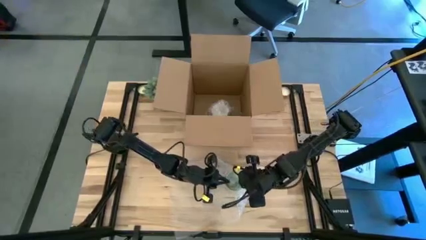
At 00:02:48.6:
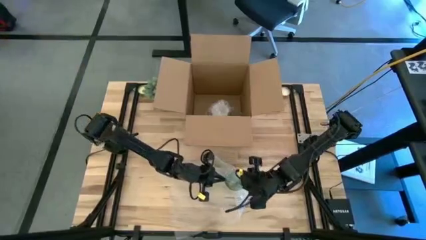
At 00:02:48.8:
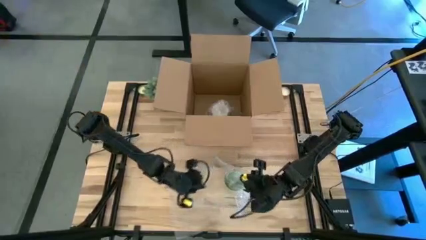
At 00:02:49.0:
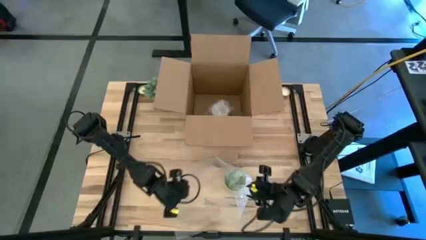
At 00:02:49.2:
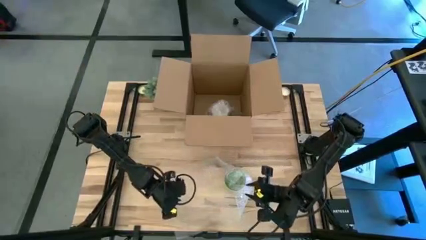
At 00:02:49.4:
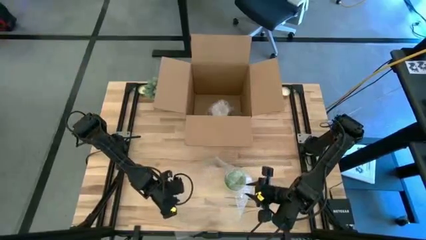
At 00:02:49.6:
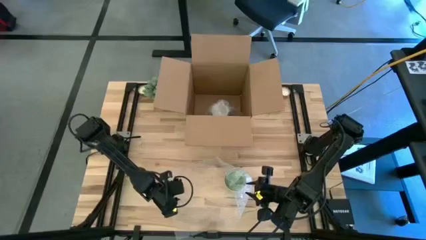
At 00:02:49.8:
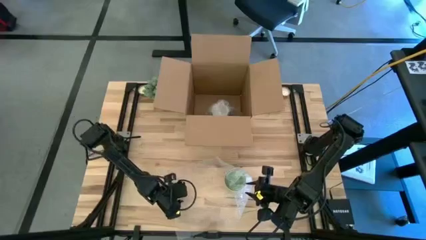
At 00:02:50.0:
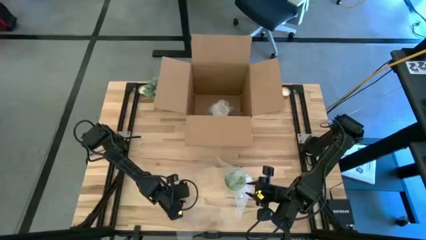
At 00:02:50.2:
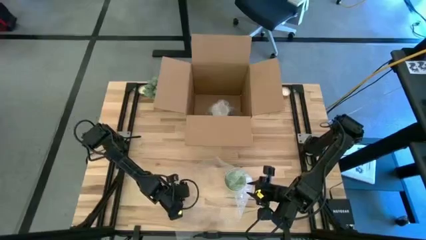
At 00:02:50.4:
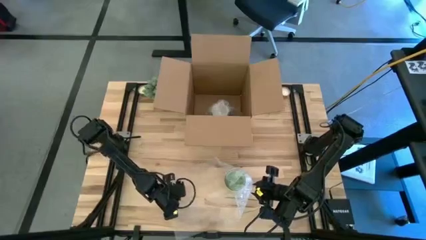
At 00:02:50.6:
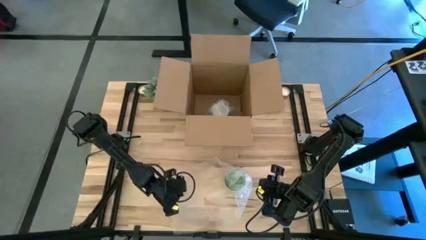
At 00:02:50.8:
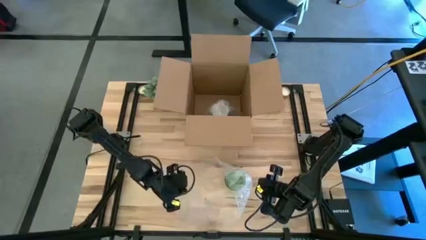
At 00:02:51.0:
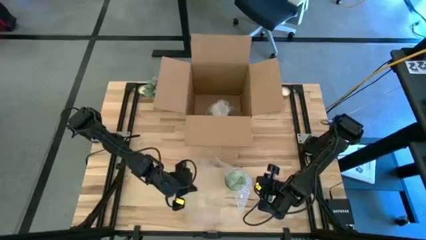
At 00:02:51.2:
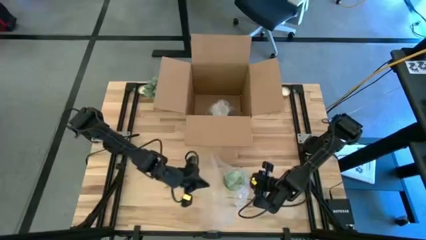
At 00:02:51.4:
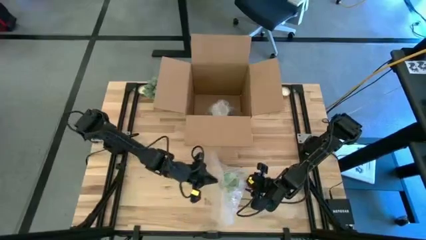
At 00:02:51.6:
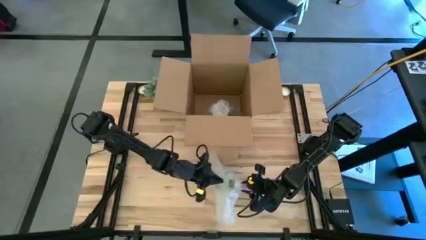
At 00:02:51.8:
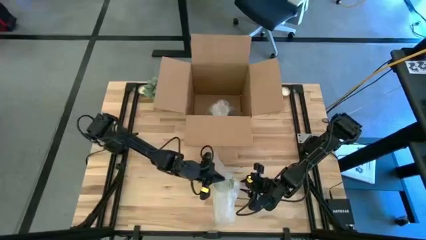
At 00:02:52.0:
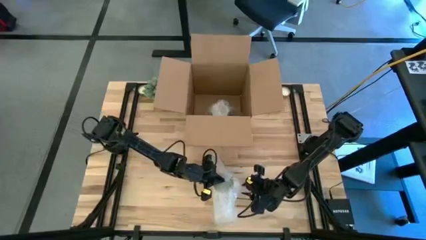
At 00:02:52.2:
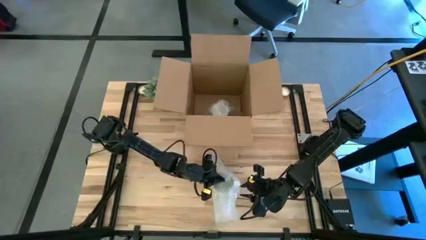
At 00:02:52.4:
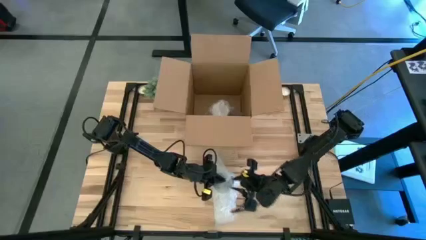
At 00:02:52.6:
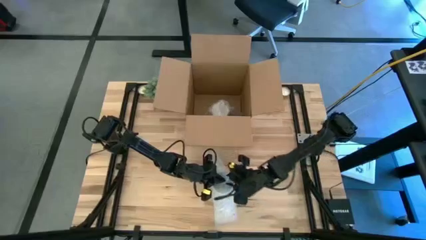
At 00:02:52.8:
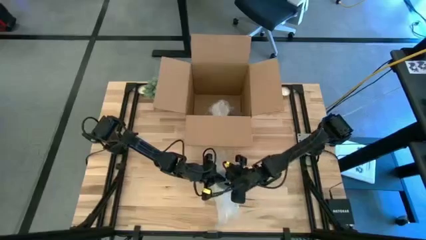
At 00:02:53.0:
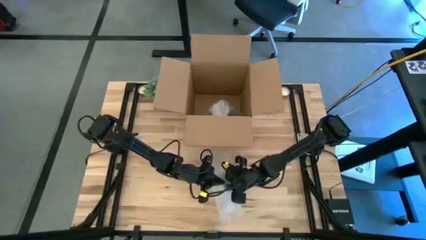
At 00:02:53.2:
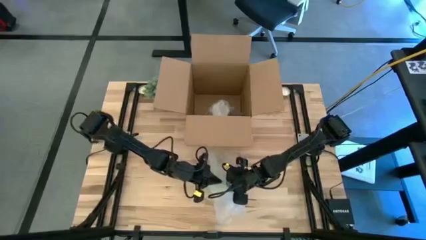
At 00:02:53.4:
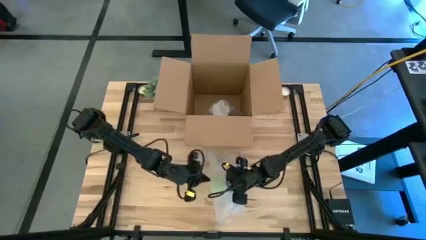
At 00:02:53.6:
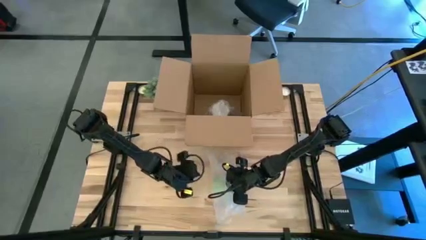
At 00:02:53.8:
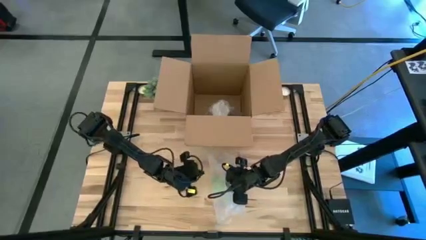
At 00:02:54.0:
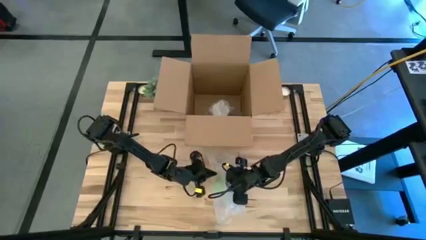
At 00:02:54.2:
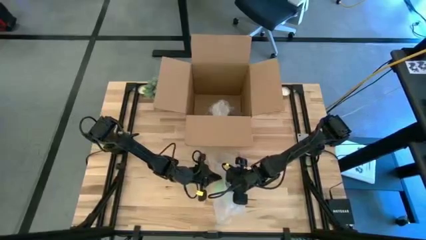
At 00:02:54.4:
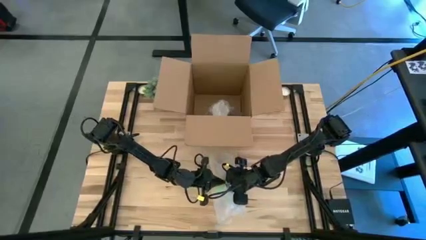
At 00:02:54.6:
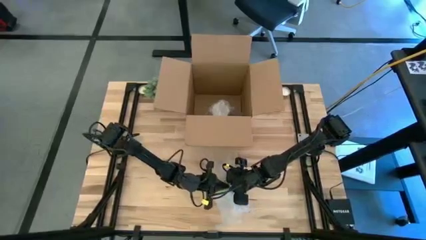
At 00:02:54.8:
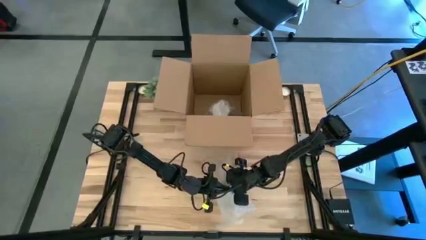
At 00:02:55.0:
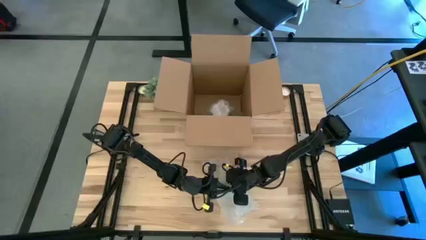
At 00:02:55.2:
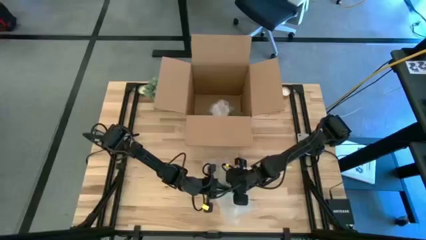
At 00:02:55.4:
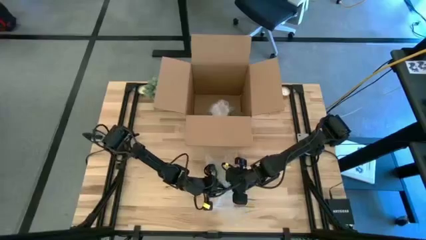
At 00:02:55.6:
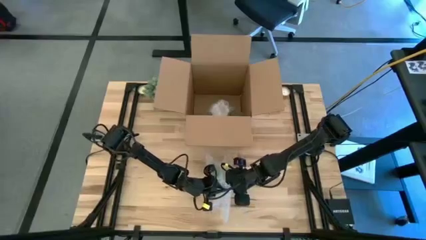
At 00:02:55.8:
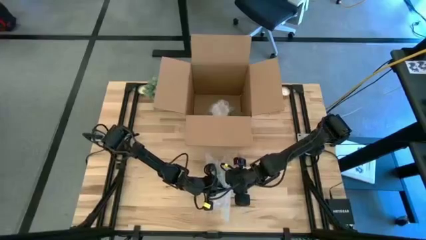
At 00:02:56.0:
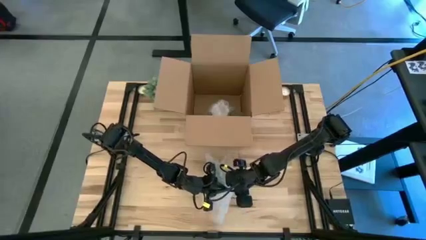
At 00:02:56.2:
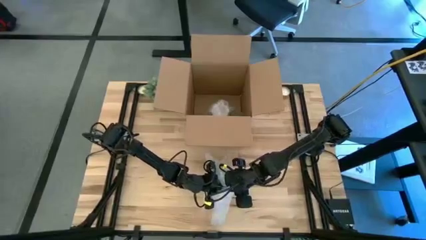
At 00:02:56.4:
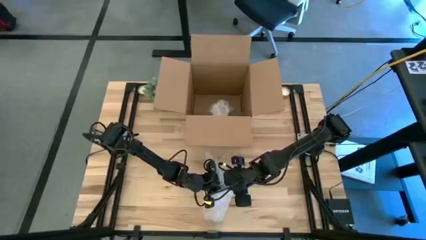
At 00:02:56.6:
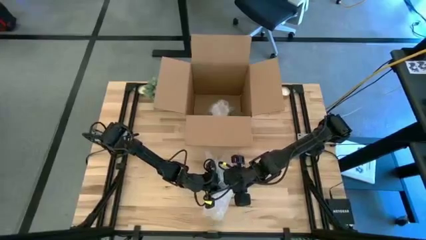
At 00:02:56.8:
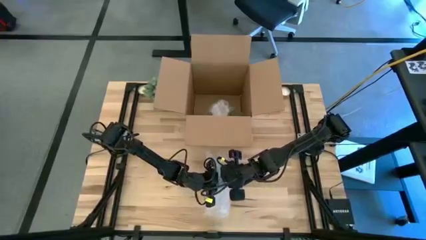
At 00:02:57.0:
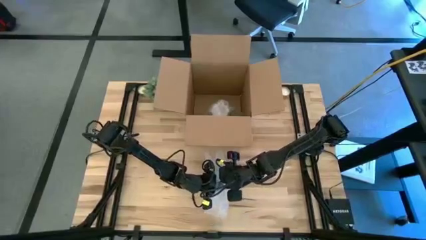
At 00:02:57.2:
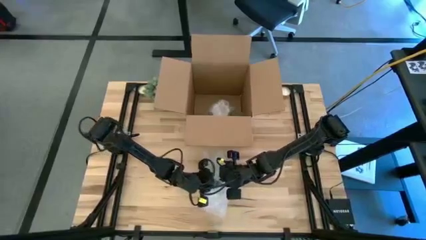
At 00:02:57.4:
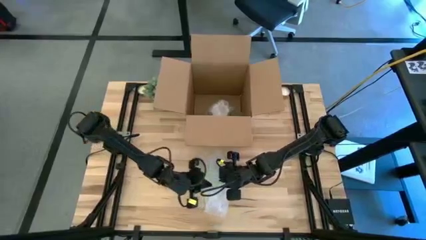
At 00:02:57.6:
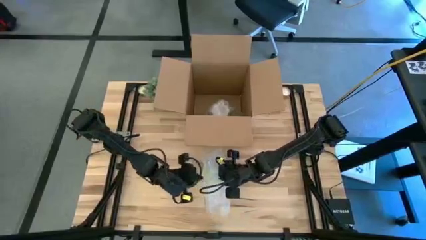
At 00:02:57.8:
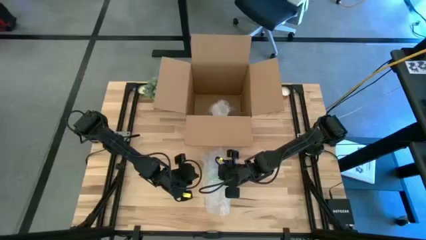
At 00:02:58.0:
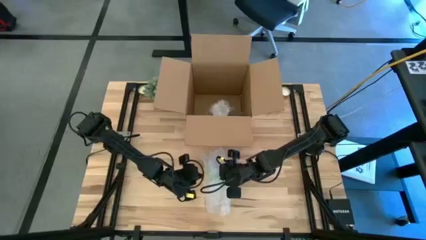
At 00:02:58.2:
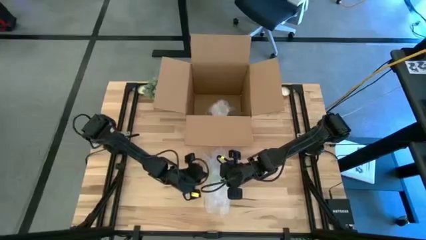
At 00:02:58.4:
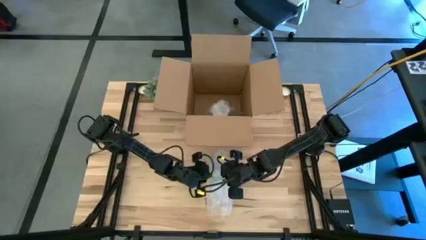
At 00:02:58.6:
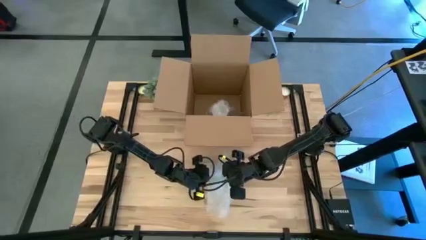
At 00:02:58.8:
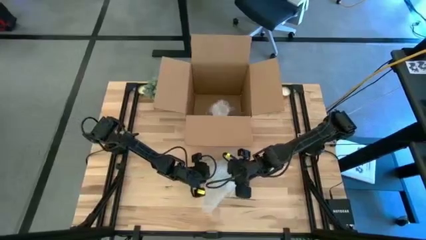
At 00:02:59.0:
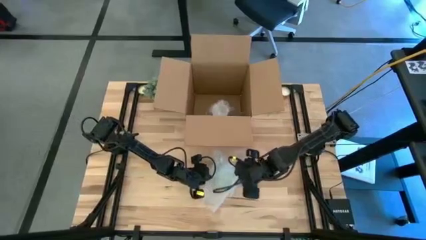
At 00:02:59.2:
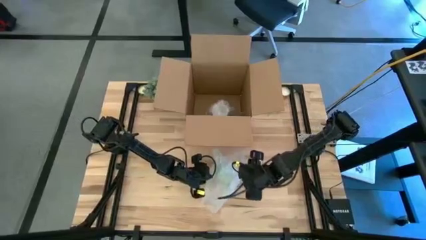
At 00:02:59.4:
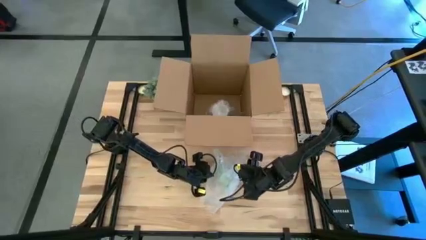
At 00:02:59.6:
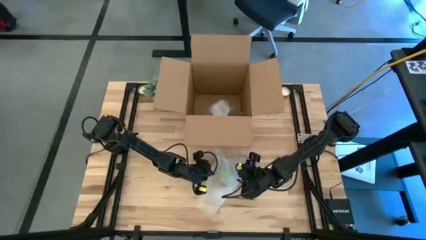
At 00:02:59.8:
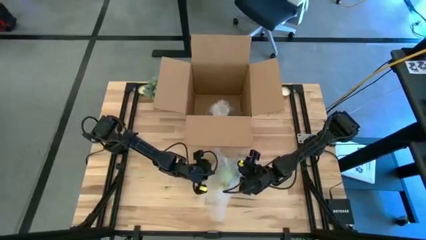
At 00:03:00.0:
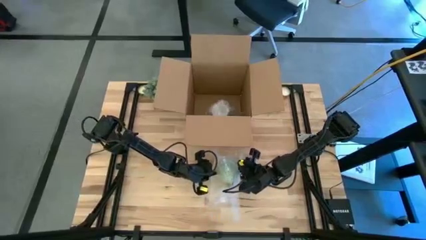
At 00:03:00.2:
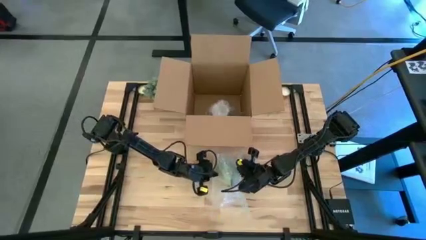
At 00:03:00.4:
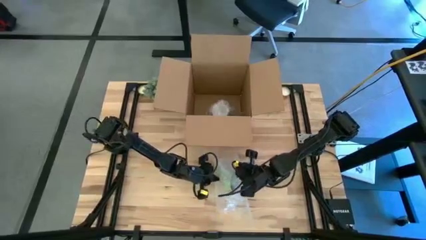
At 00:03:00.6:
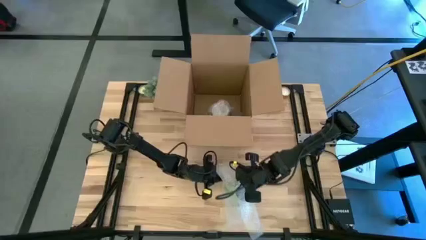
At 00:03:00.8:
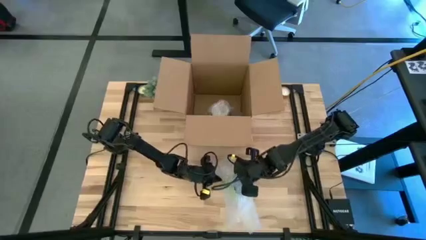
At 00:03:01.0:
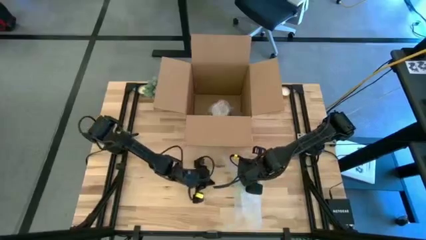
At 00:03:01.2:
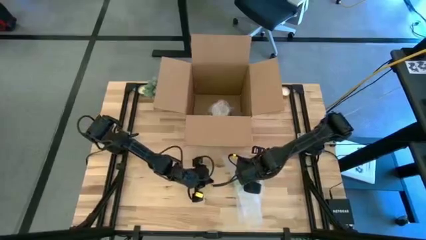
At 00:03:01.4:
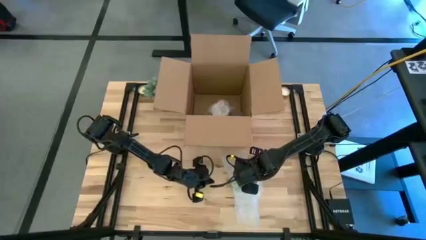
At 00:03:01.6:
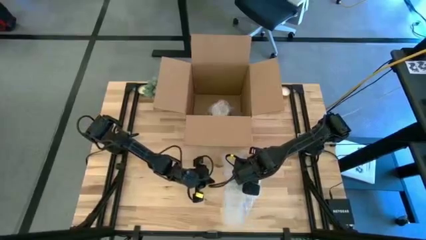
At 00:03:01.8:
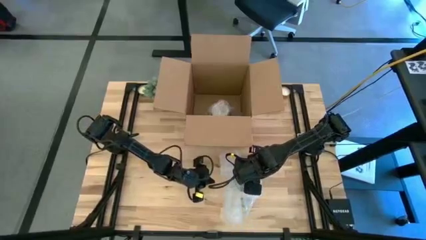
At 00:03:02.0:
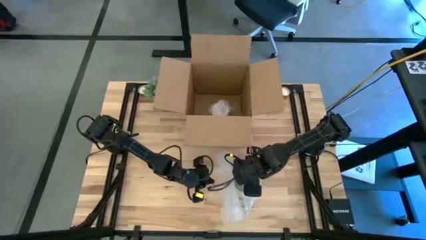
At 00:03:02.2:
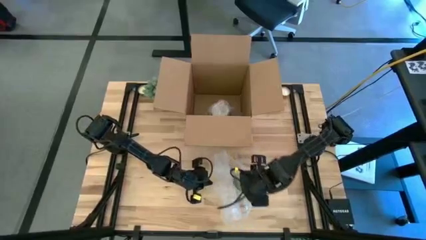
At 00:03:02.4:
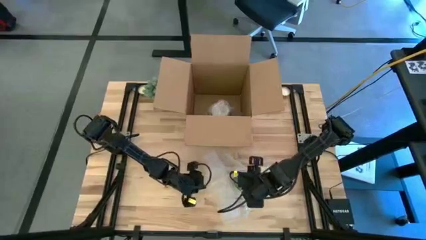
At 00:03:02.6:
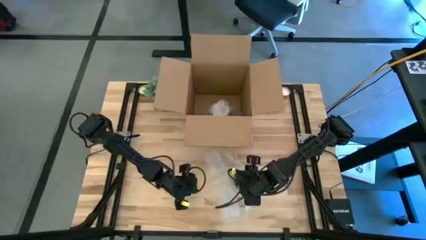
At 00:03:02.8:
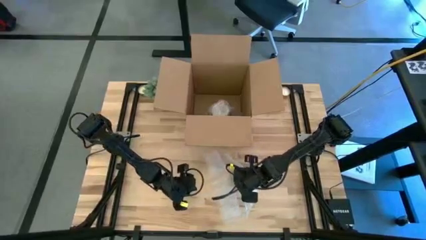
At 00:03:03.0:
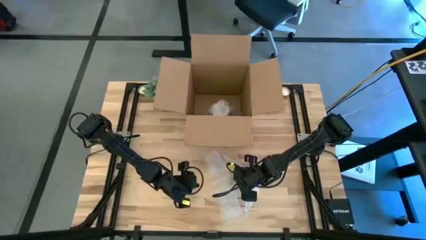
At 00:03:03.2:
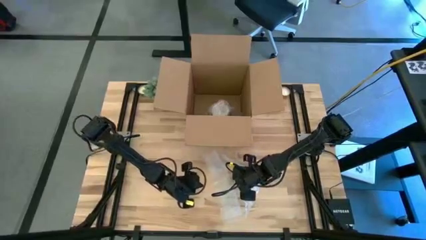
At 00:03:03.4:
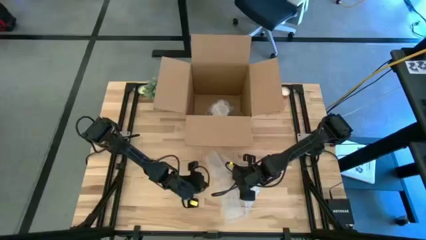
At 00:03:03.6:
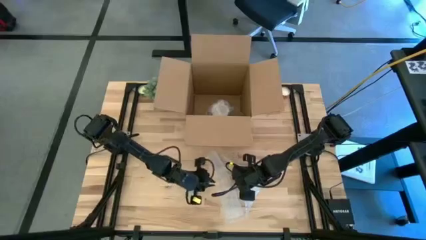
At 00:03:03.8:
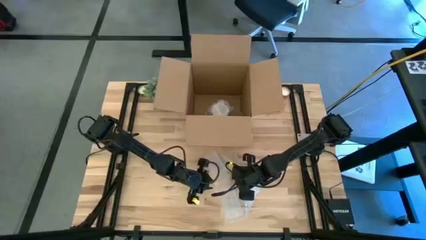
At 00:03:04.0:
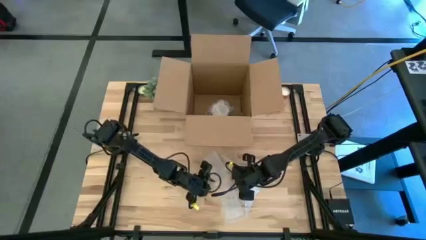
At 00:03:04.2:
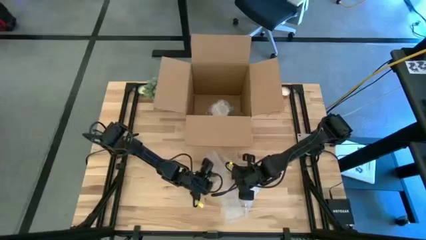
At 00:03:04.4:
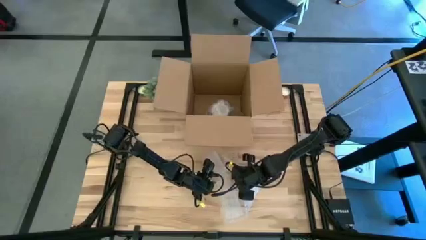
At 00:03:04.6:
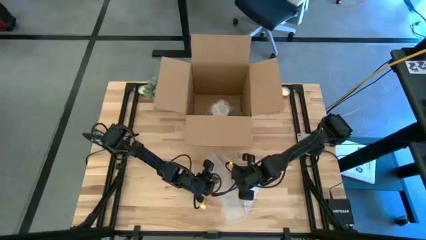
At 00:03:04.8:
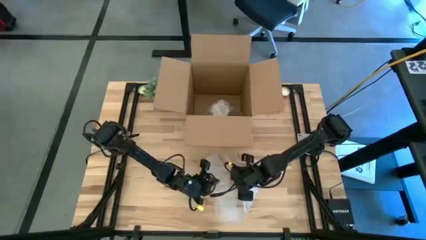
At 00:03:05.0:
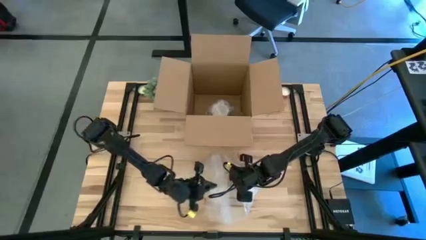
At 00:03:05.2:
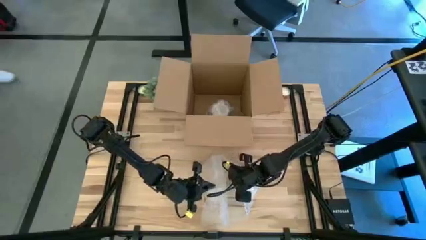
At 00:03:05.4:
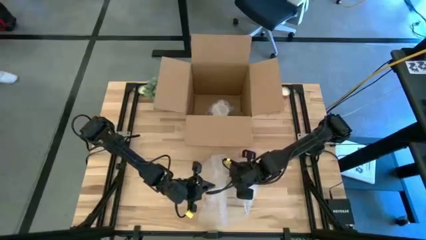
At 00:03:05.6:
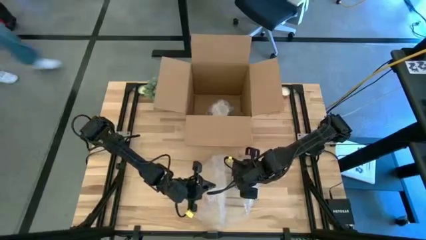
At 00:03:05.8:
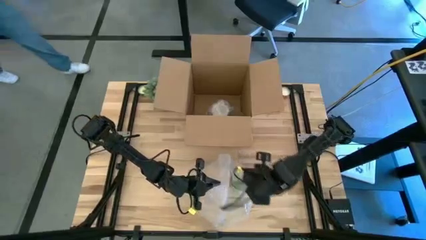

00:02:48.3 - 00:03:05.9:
Task: wrap mug
Wrap the green mug with bubble wrap
